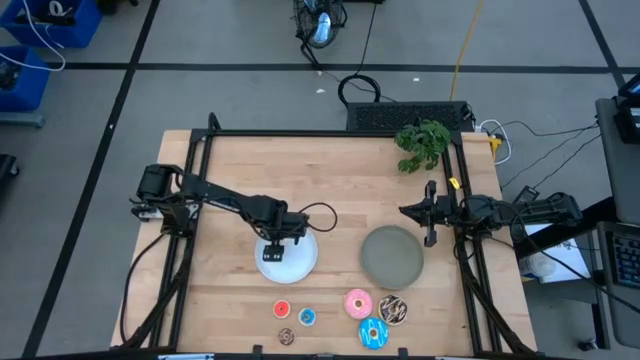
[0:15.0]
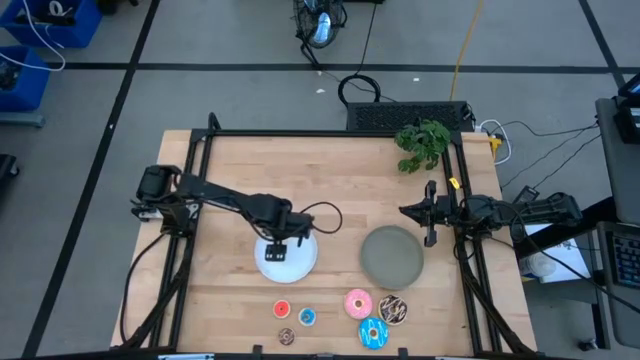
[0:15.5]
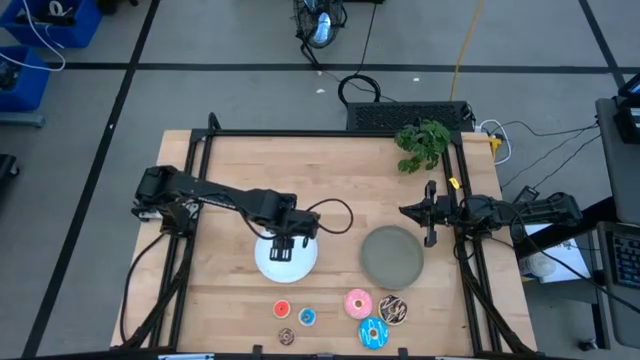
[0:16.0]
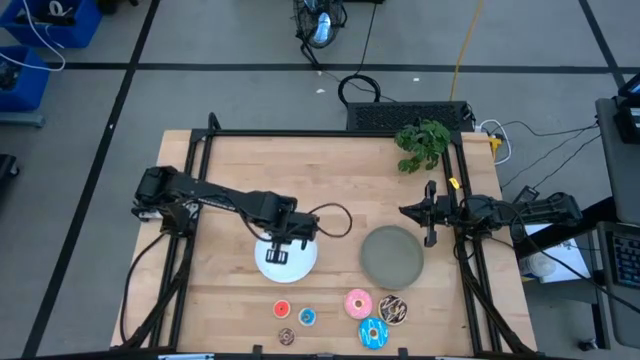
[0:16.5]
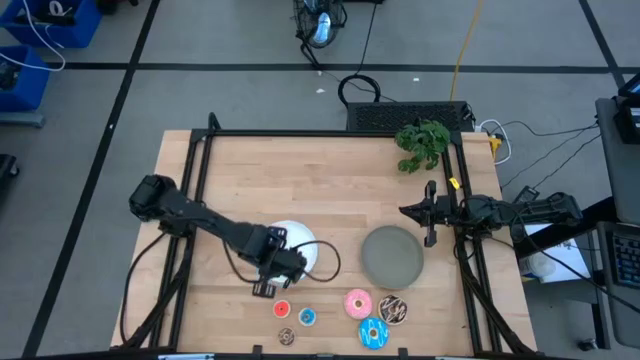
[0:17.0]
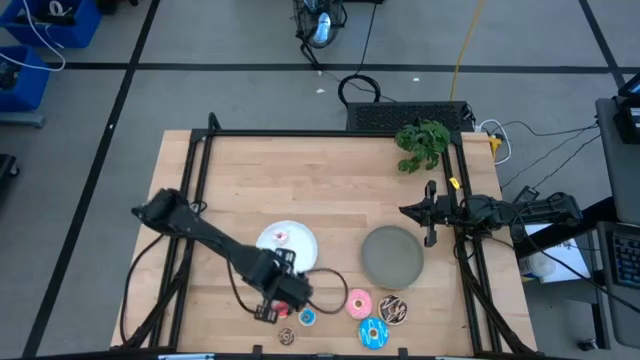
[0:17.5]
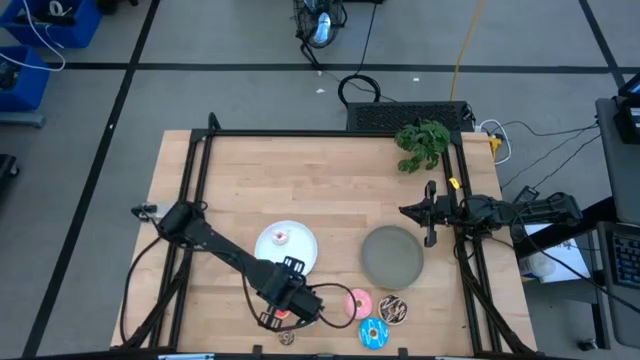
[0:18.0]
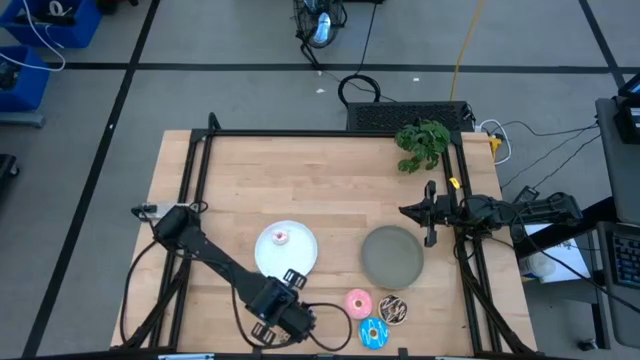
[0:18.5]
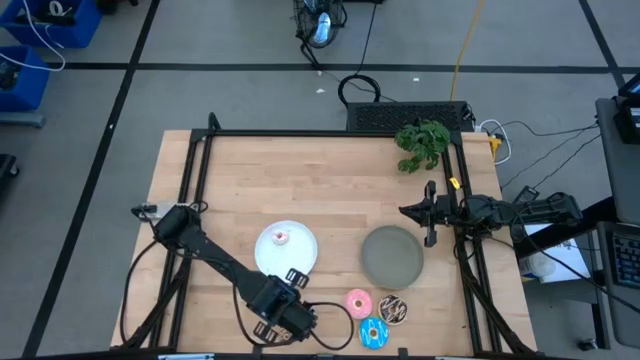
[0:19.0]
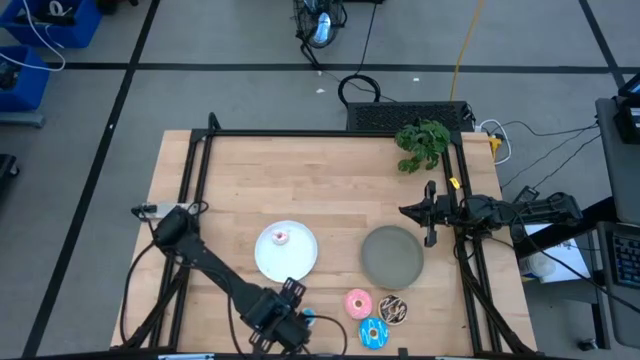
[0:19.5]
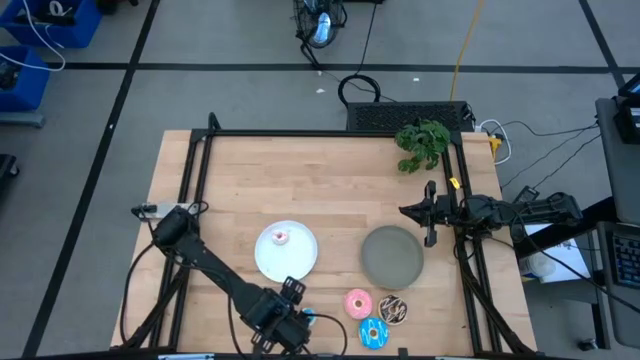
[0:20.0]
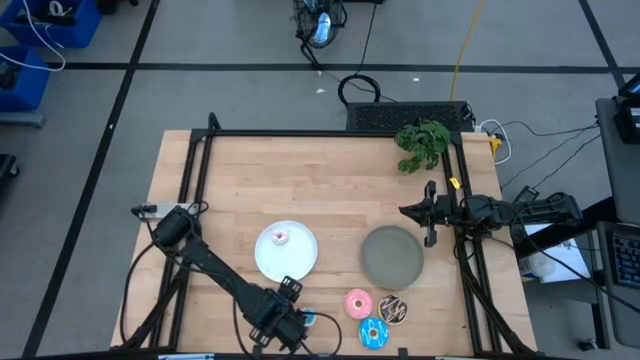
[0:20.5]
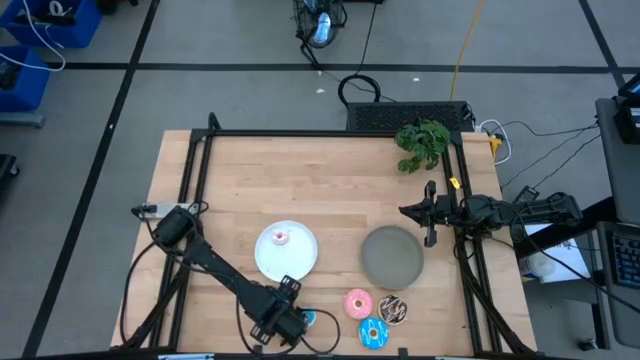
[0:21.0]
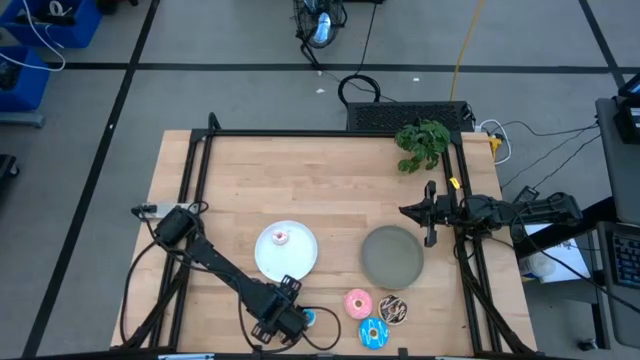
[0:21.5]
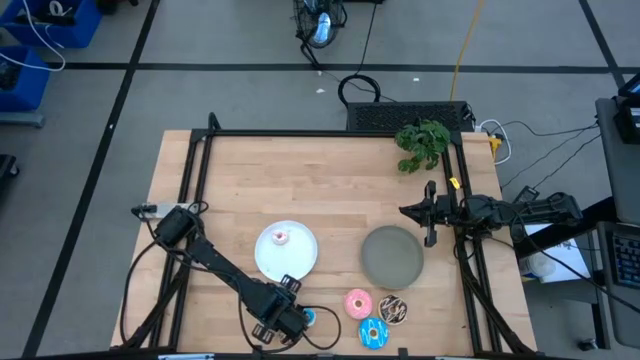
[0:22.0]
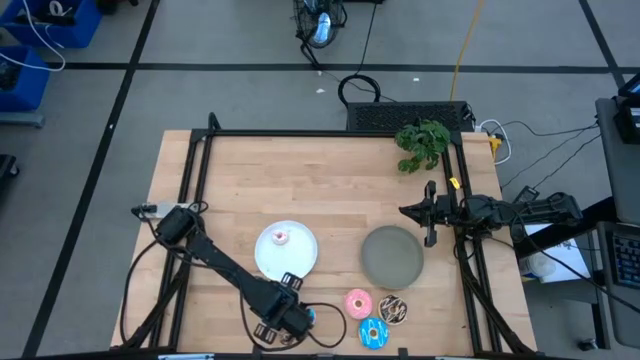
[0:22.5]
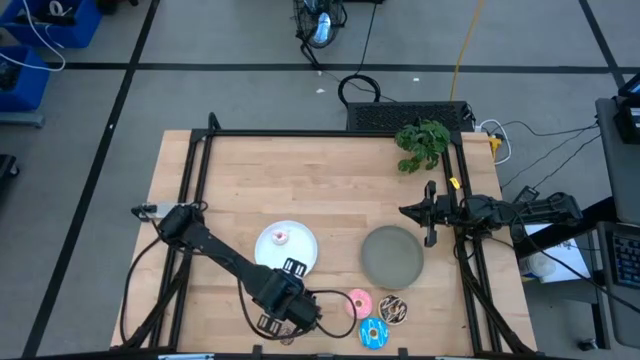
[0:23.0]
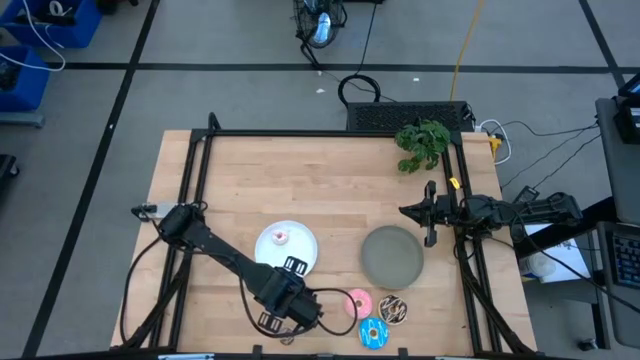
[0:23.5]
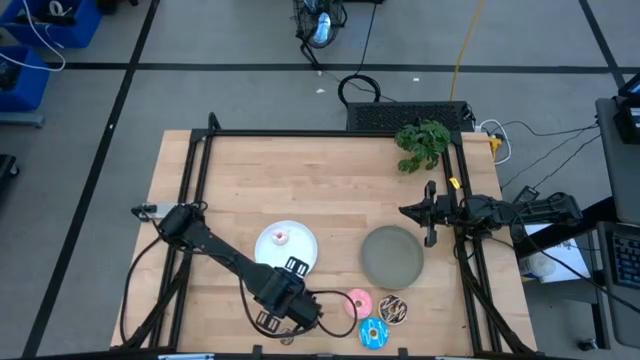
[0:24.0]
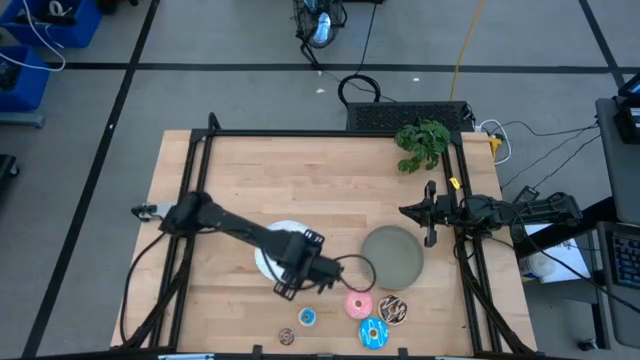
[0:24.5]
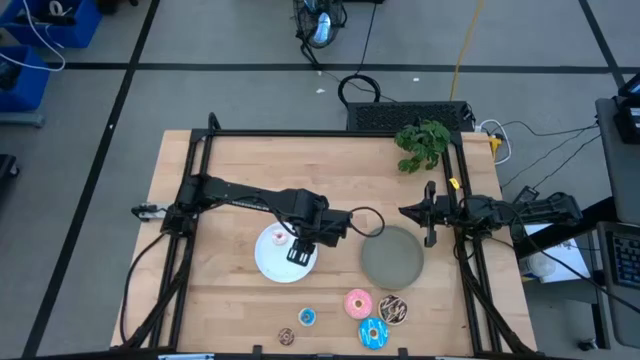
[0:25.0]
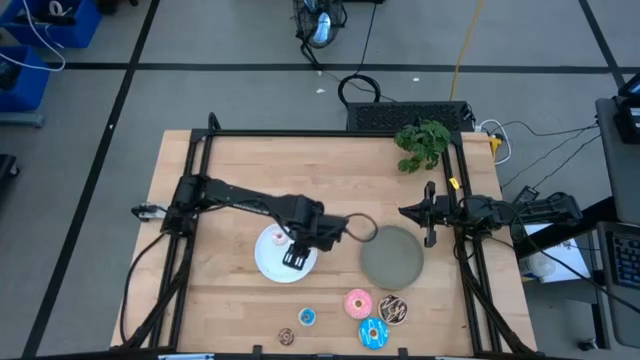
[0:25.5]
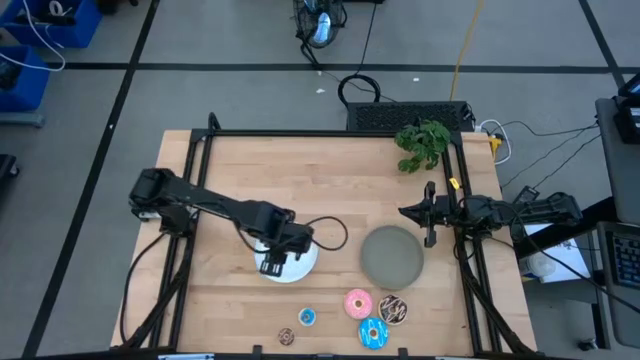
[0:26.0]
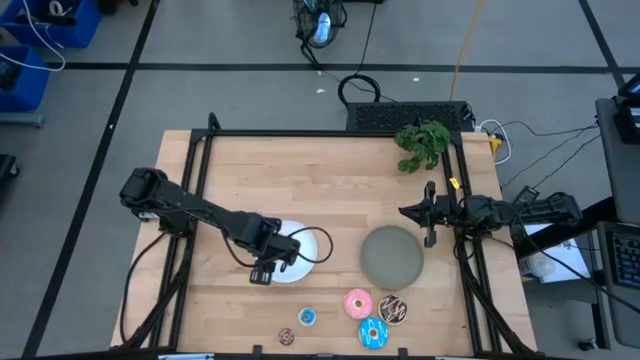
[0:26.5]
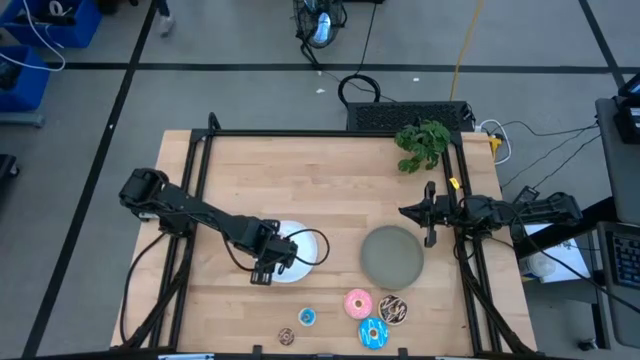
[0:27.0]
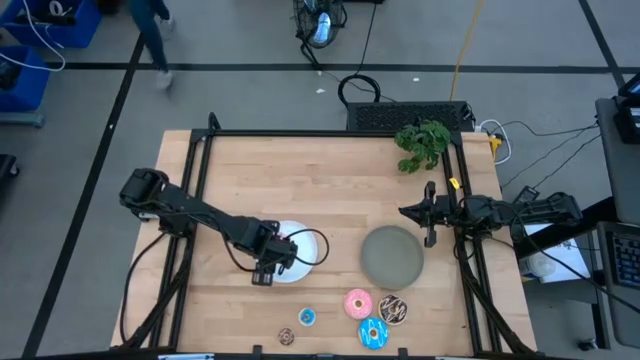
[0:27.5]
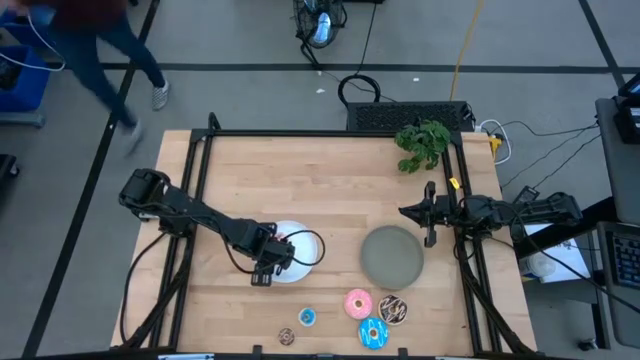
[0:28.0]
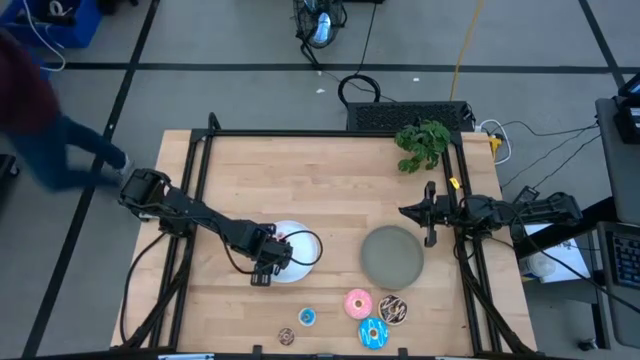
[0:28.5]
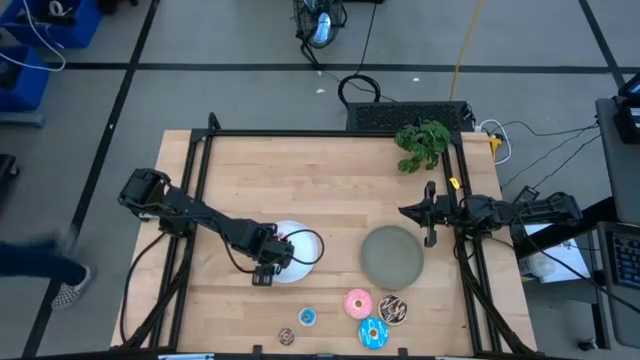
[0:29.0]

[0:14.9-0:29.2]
Task: Pick & Place donuts
Put the small orange donut on the white plate

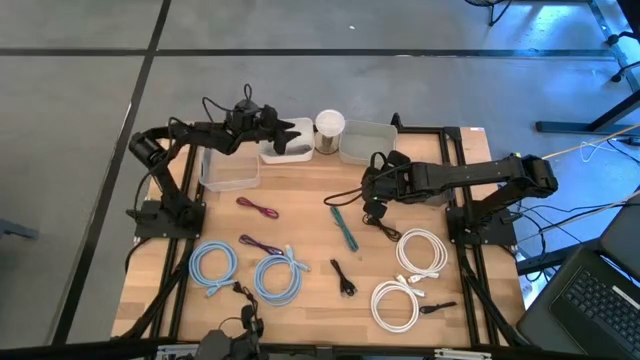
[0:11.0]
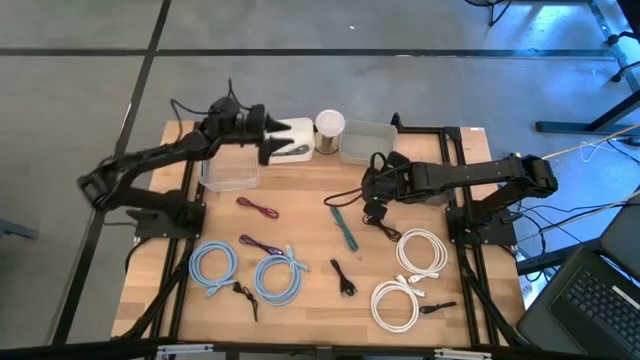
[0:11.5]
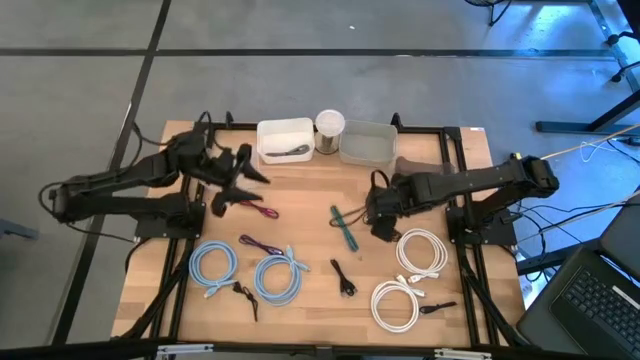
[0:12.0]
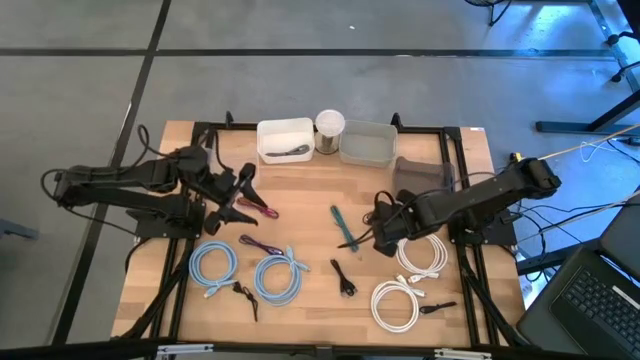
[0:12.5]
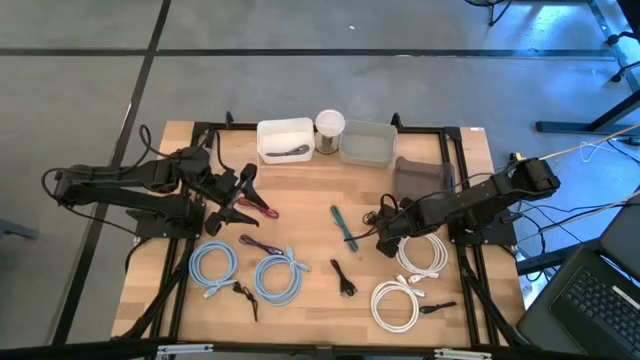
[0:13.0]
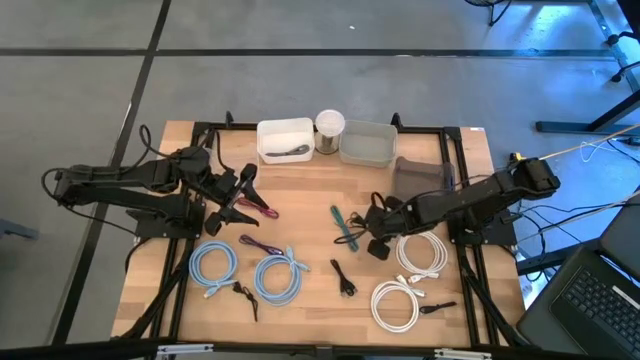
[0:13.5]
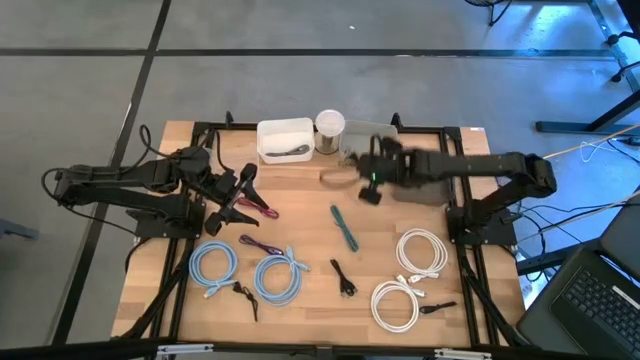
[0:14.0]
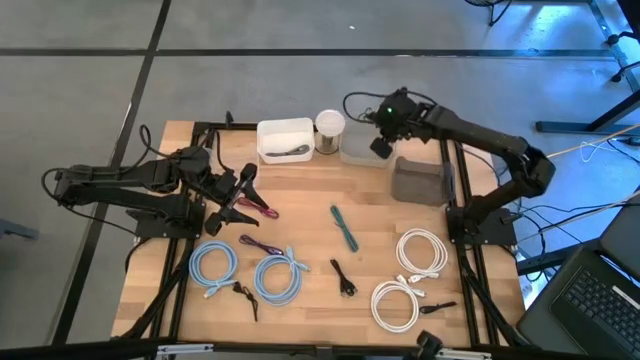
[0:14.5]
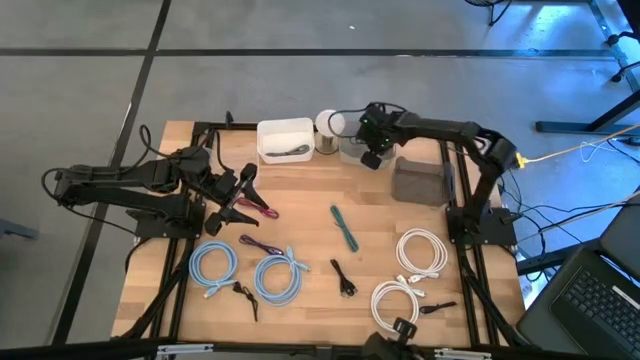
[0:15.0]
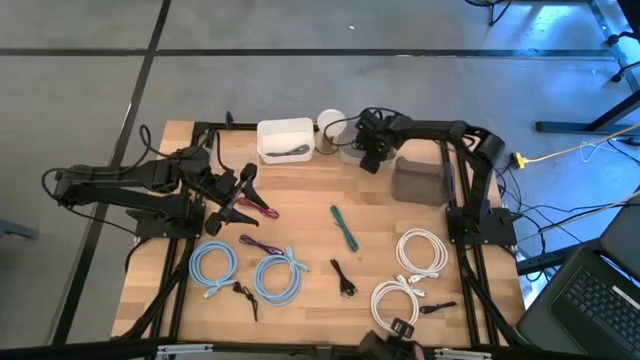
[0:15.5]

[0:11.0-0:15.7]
Task: Pick & Place USB Port
Put the black USB cable into the gray bin

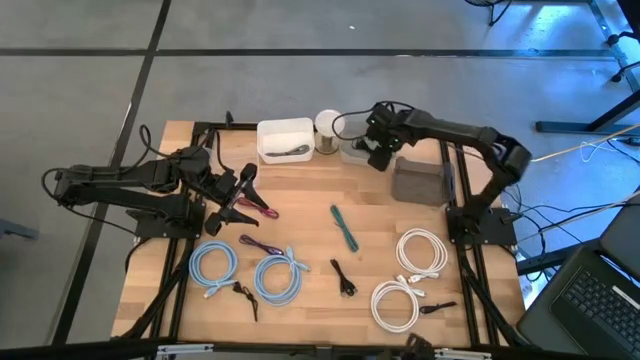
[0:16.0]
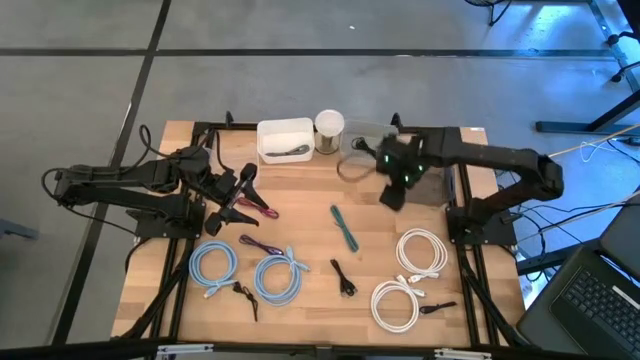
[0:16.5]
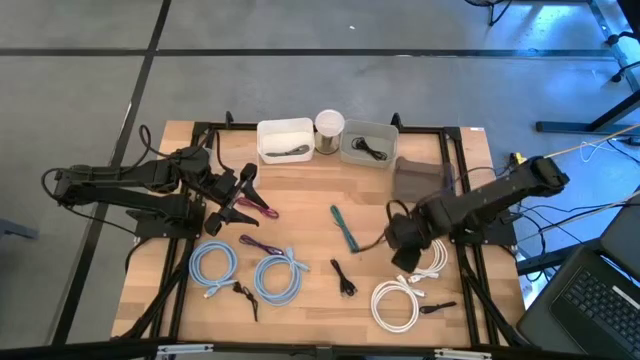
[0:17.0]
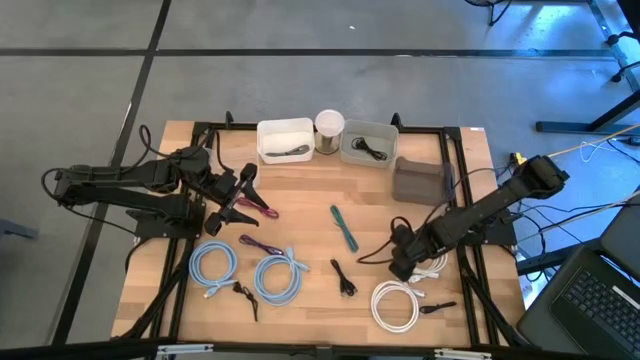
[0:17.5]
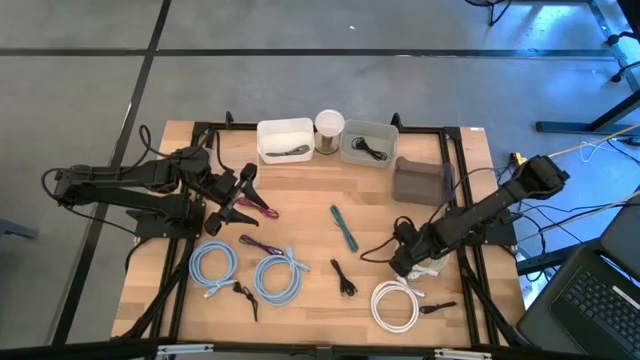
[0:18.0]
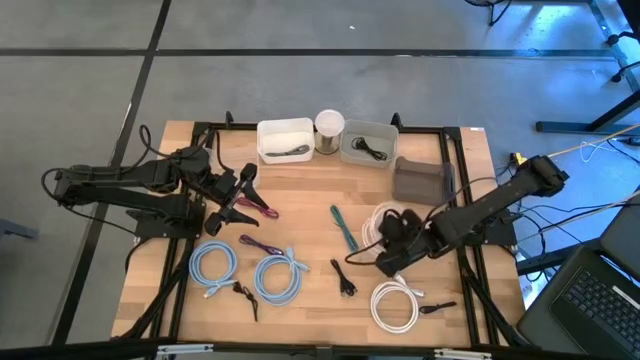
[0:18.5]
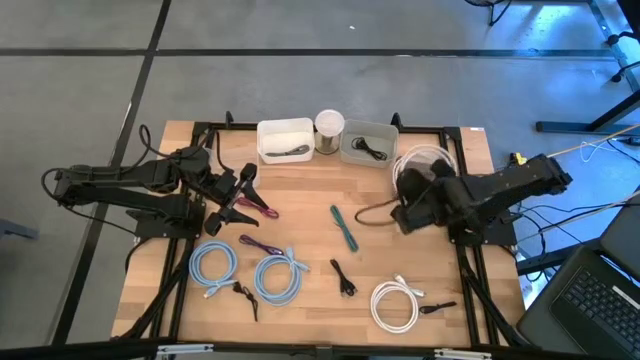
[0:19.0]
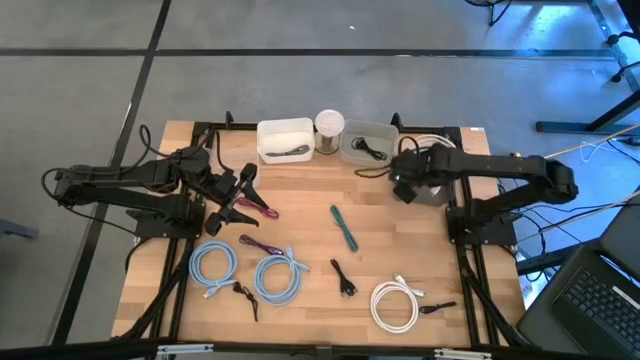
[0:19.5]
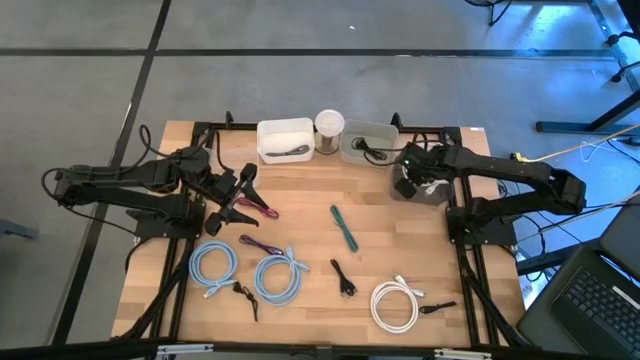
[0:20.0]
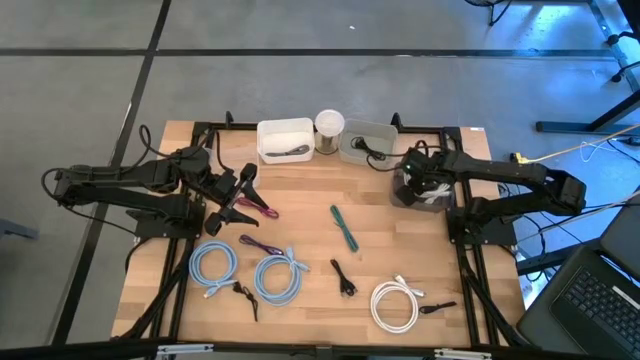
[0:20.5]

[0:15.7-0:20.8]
Put the white HDMI cable into the black bin
